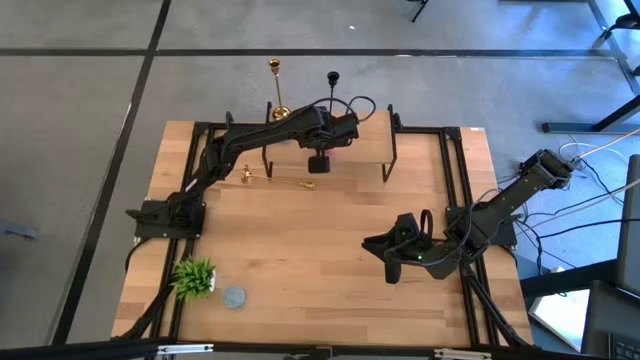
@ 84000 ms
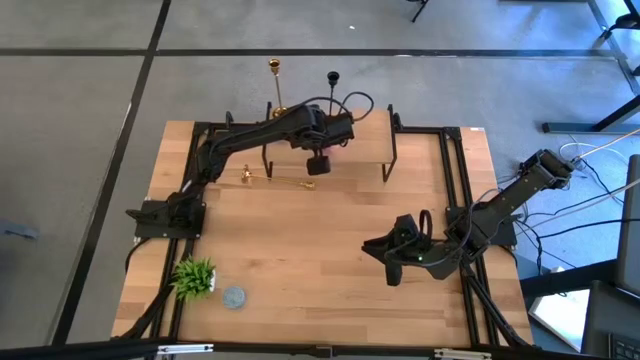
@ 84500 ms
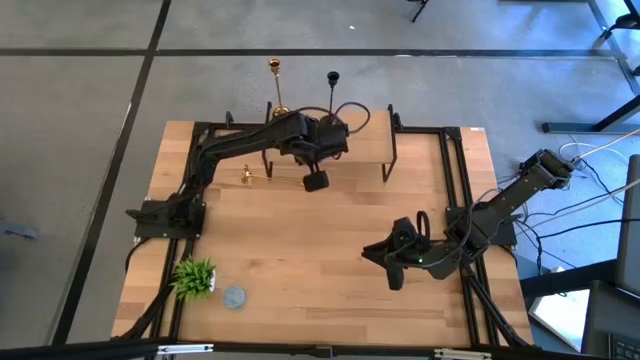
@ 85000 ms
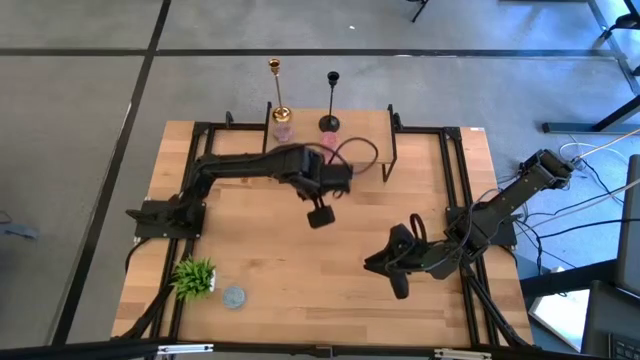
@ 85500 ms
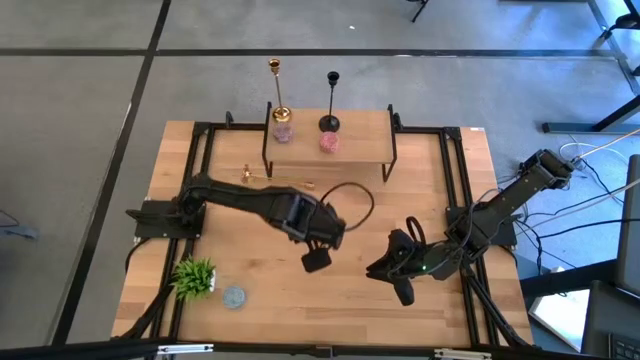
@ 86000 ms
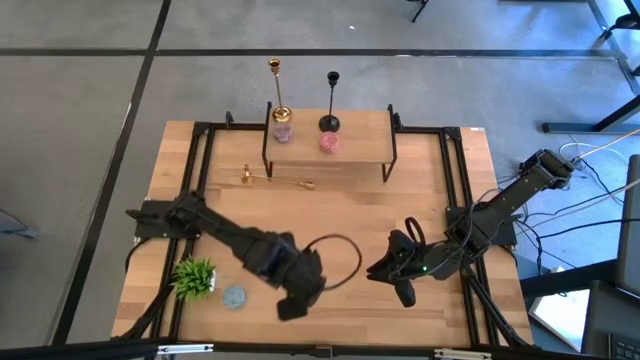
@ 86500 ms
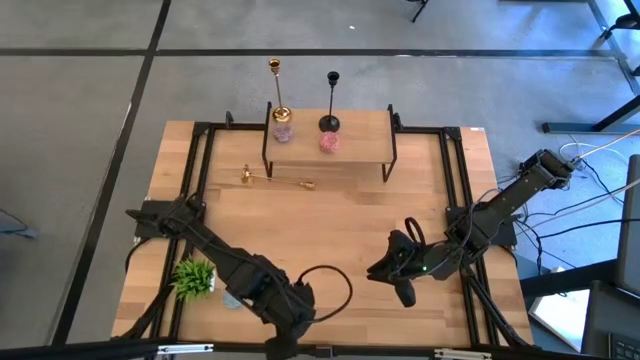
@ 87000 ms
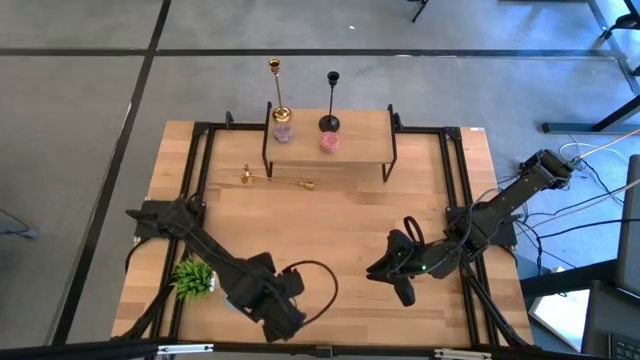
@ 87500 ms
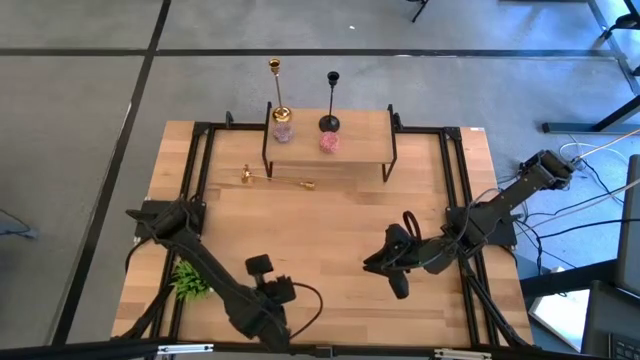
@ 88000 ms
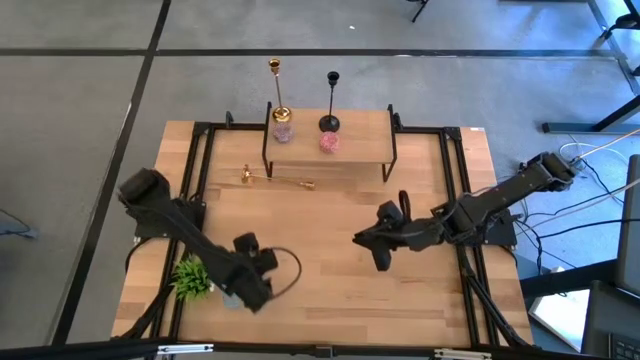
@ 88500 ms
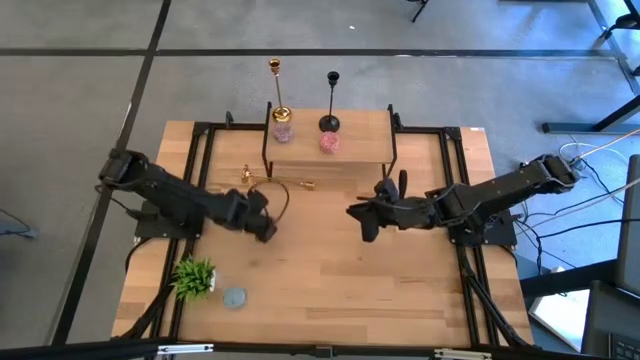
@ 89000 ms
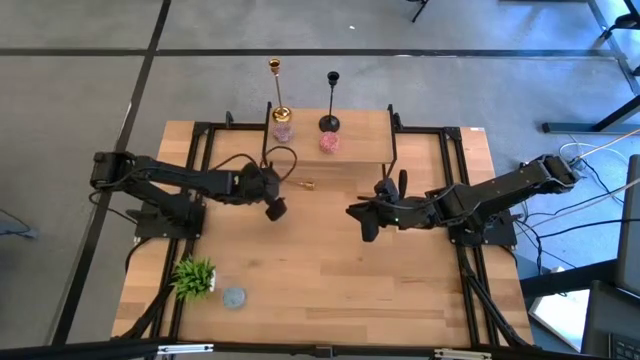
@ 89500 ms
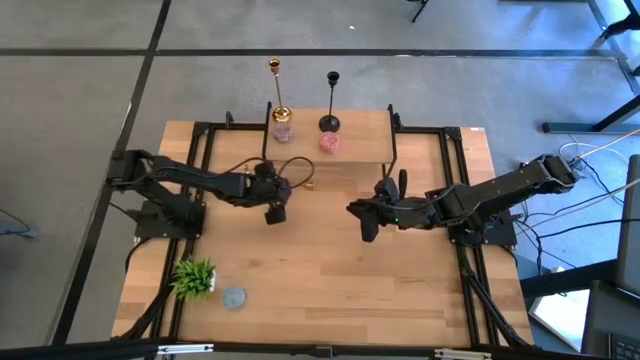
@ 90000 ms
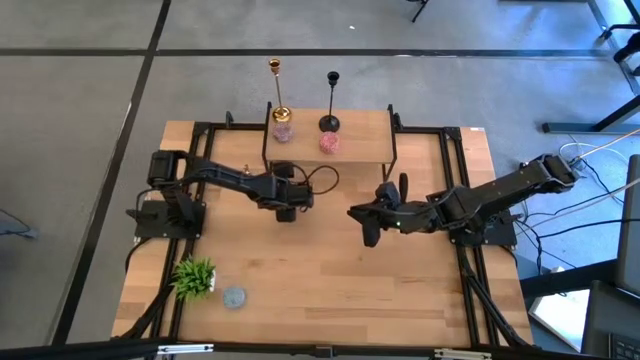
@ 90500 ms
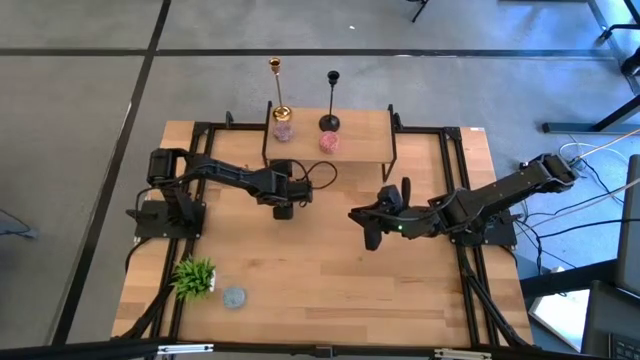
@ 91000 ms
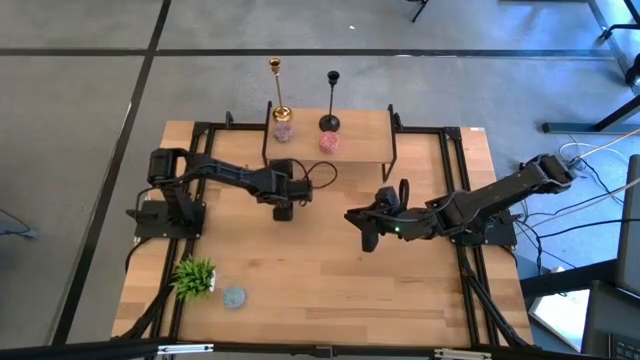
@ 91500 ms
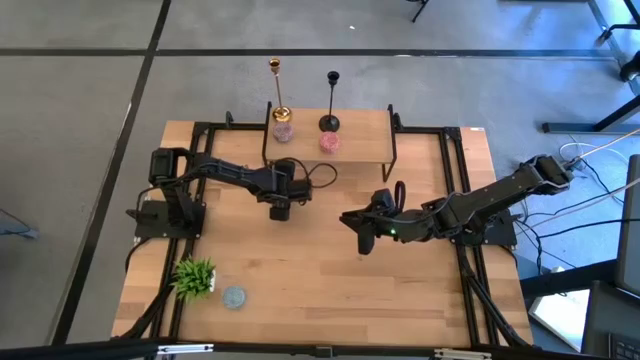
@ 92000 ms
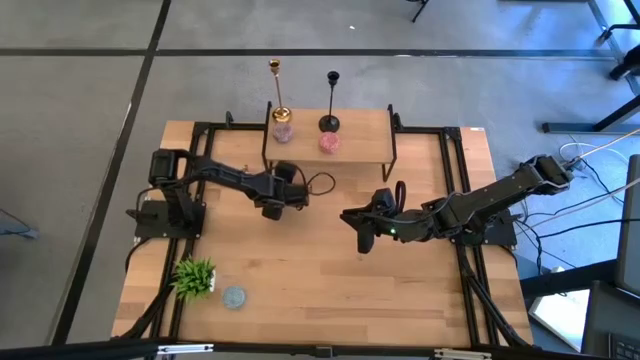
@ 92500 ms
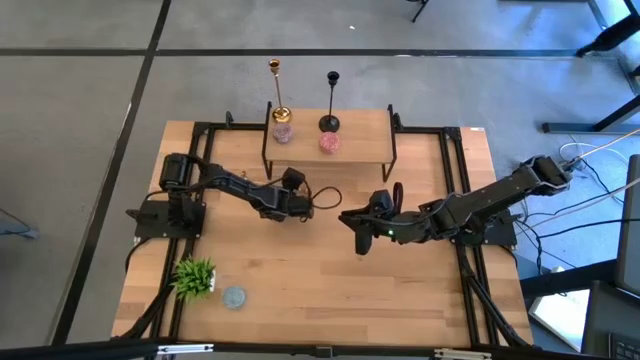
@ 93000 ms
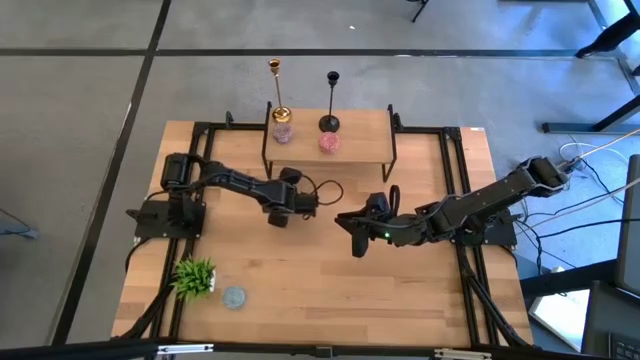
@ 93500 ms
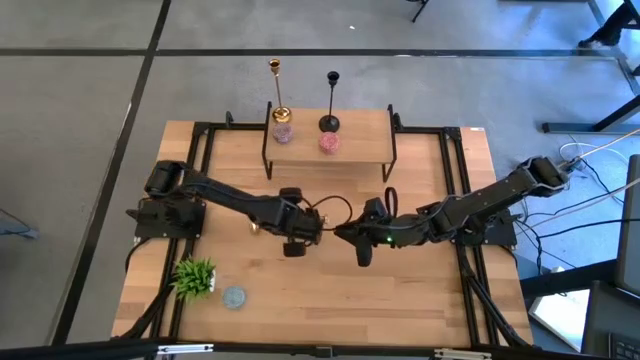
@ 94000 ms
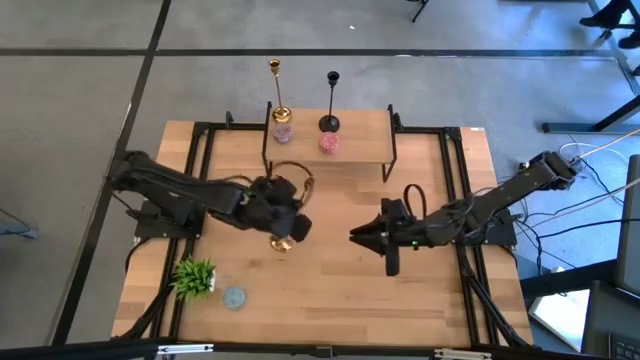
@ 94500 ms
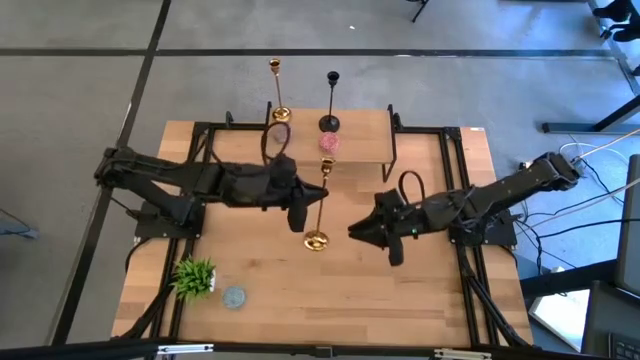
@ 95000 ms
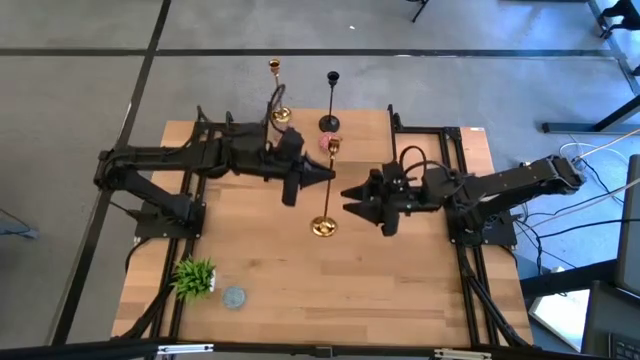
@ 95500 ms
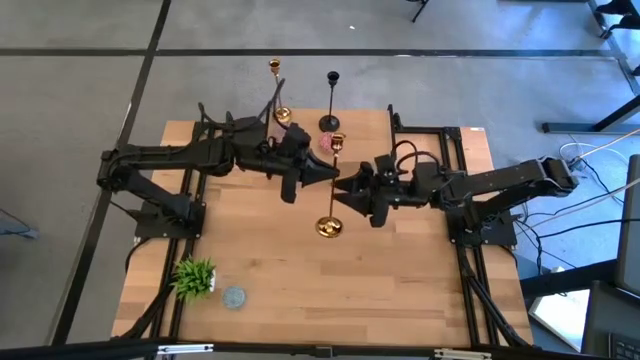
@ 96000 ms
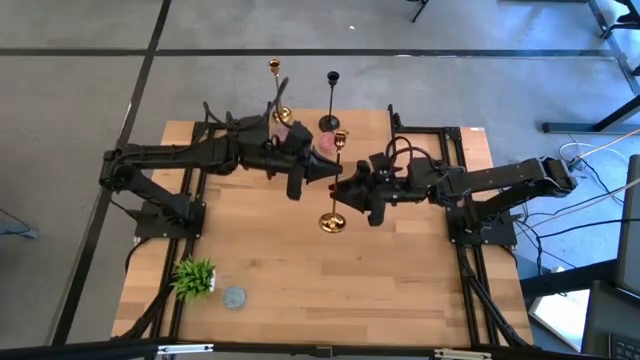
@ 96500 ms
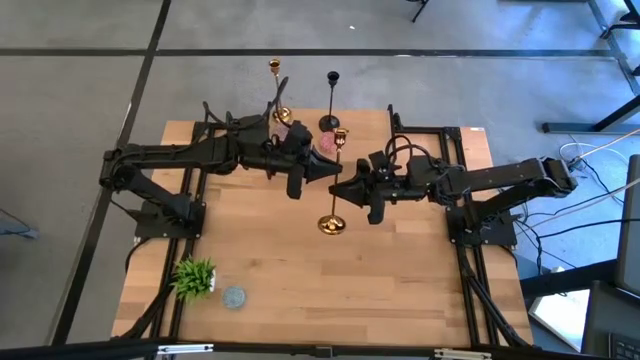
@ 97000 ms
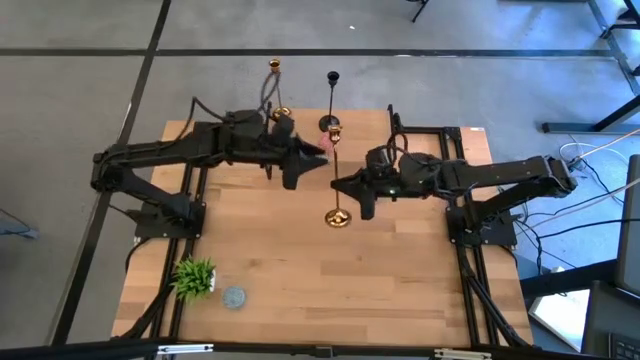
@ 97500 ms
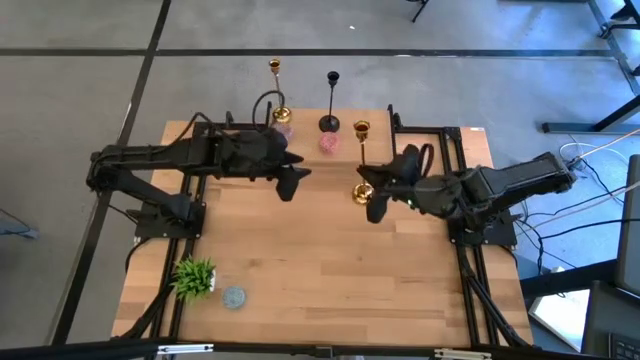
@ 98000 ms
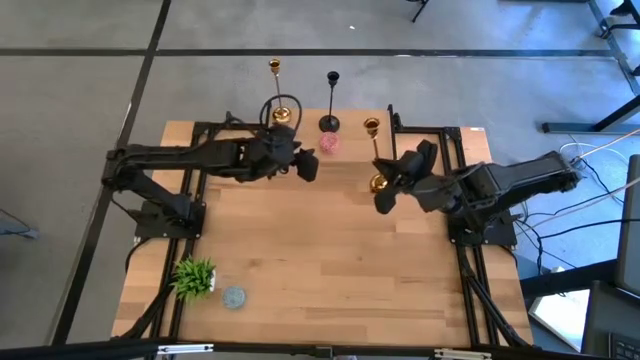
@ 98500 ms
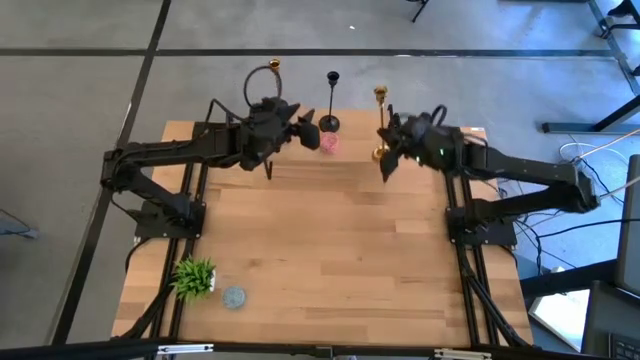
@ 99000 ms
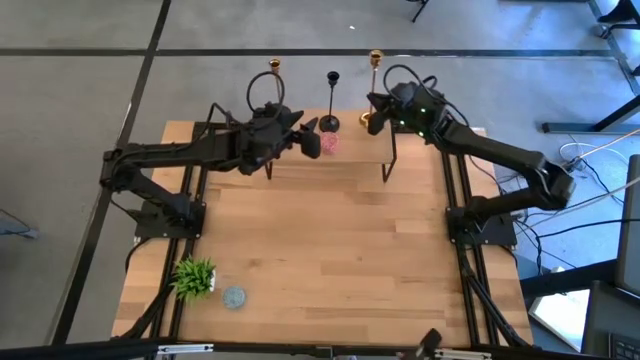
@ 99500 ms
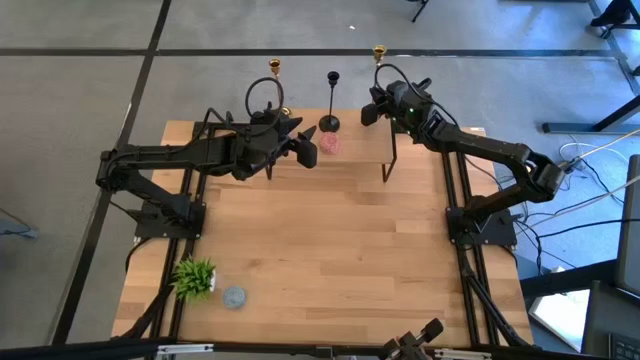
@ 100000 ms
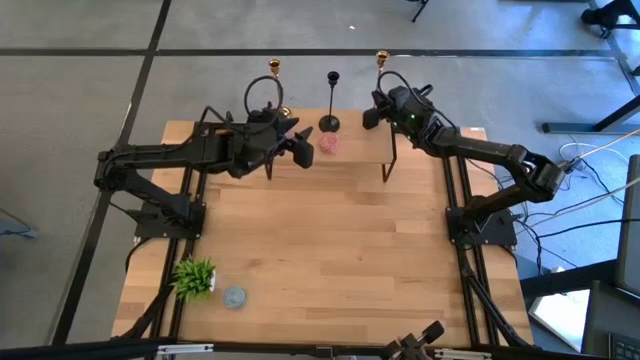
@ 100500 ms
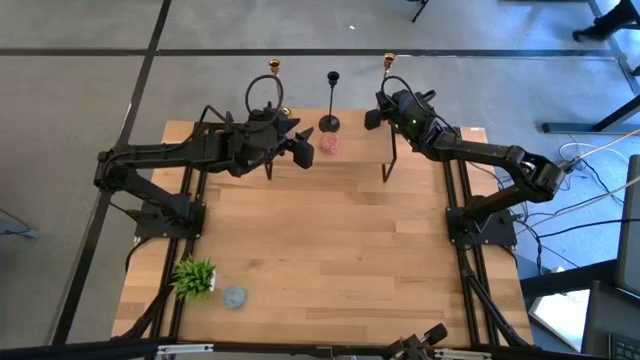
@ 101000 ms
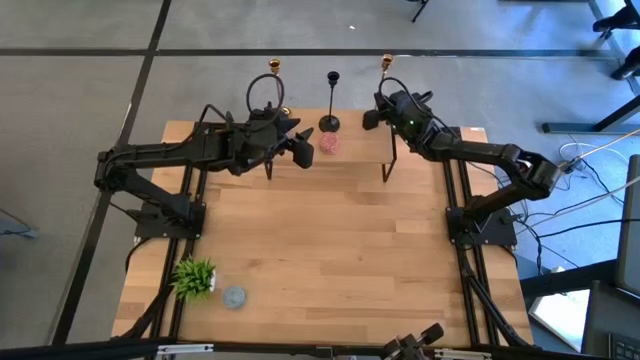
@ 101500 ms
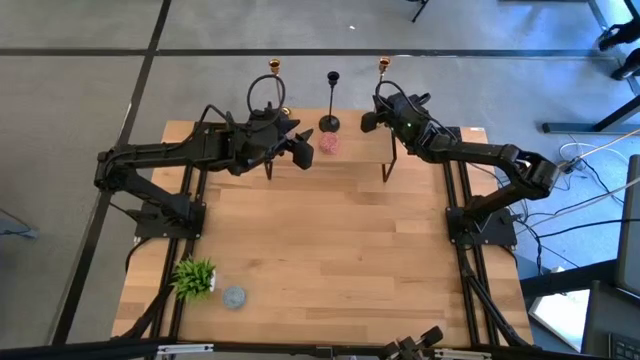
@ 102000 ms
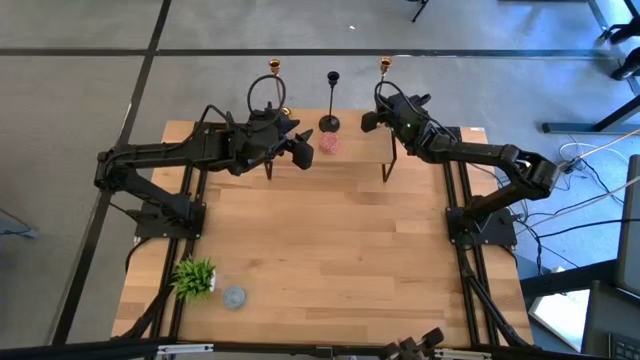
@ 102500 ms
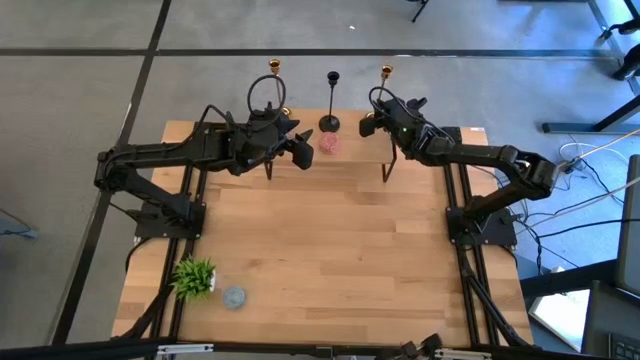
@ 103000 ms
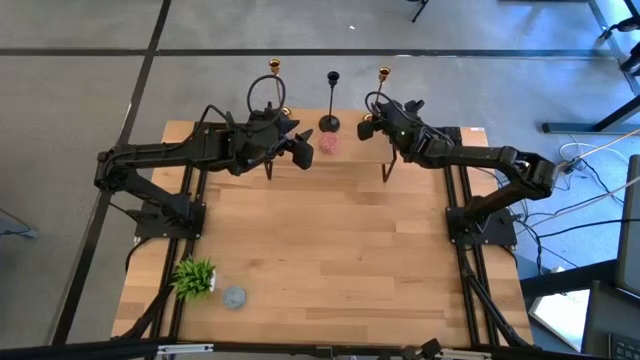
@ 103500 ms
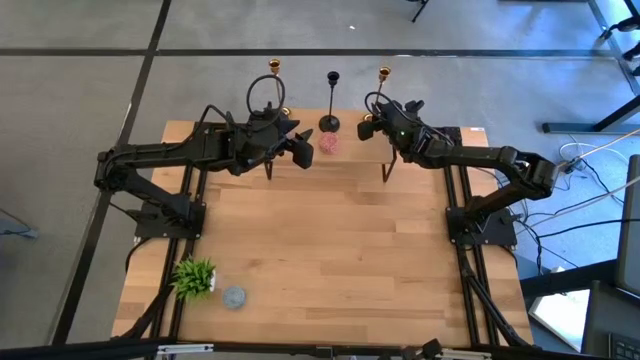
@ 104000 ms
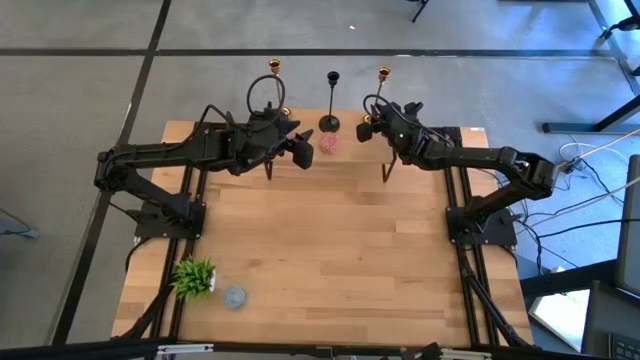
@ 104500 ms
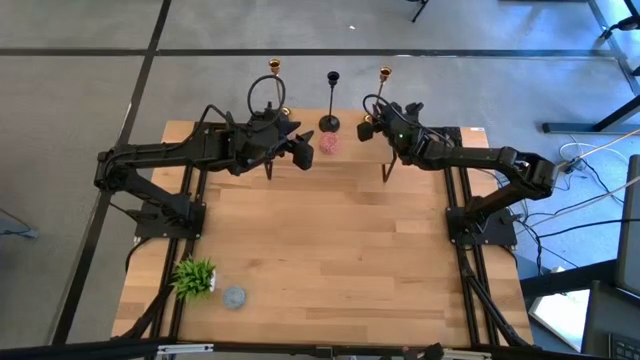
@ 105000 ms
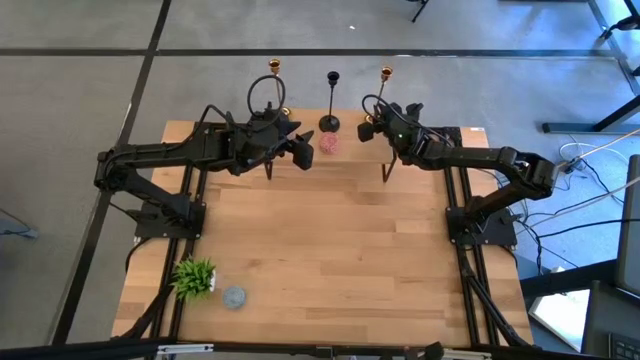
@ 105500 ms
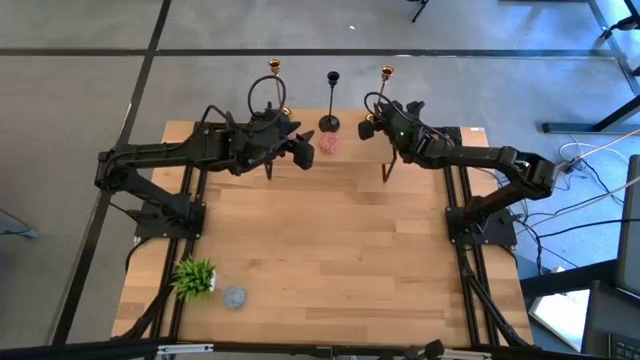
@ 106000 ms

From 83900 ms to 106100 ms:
Task: Pick & Place candle stick holders
Put the gold candle holder on the shelf
